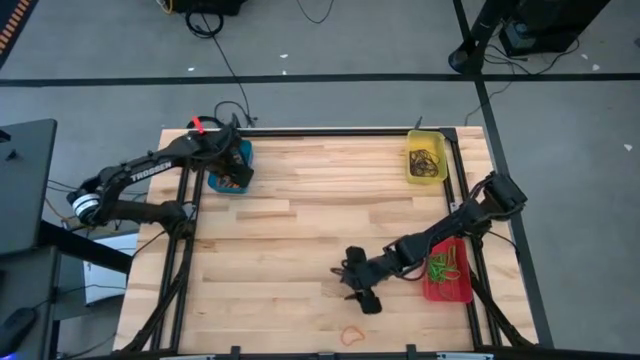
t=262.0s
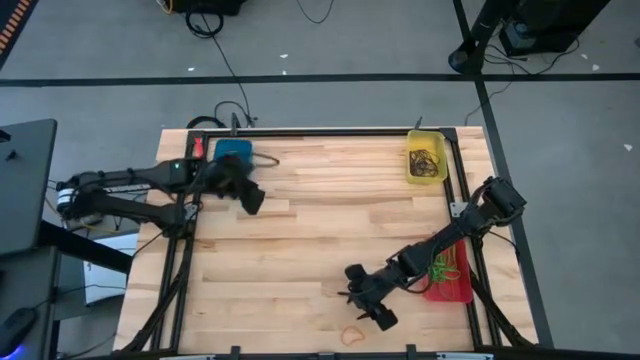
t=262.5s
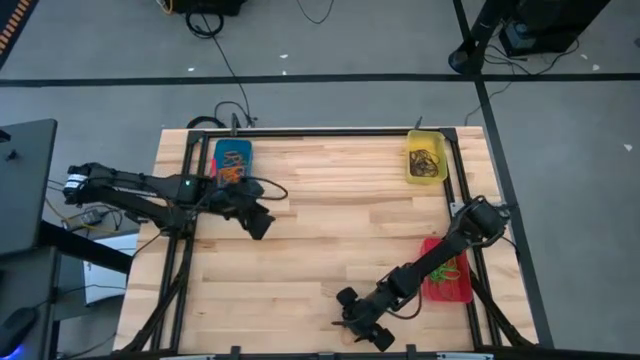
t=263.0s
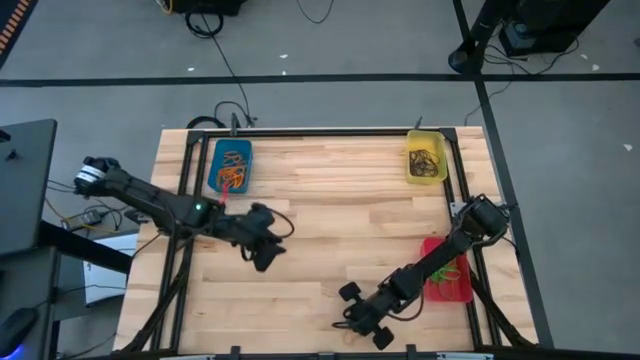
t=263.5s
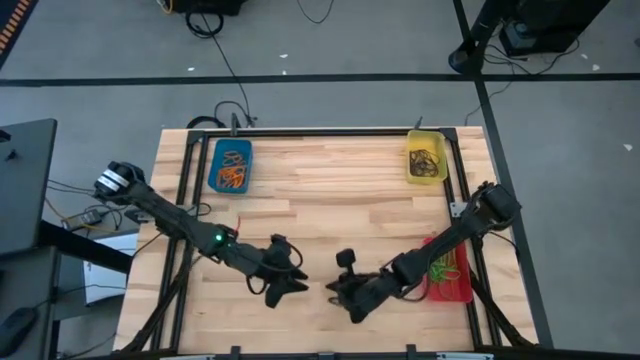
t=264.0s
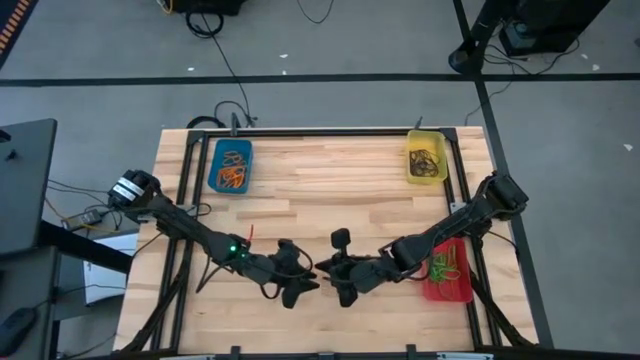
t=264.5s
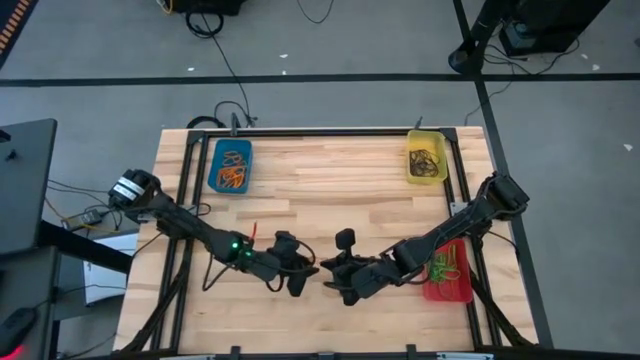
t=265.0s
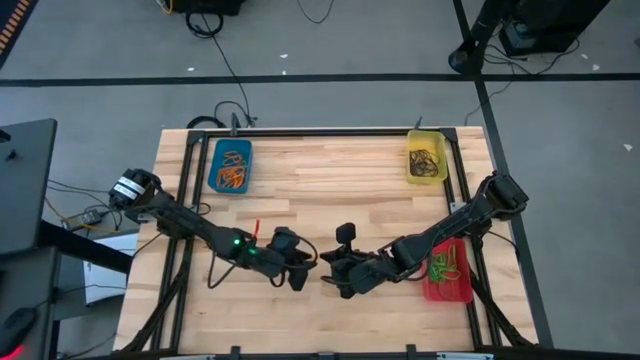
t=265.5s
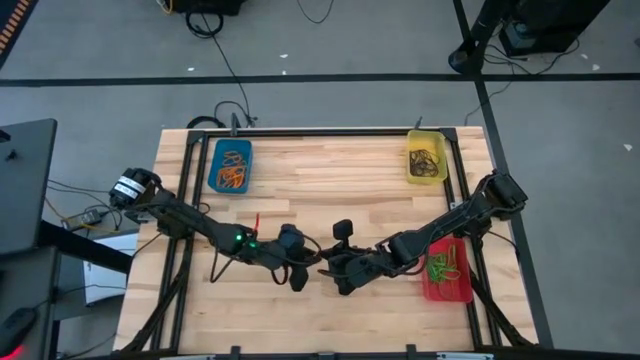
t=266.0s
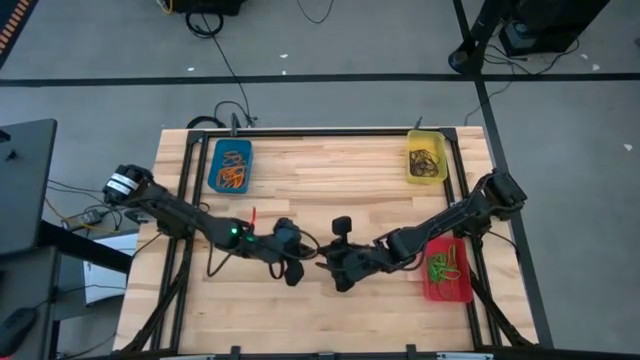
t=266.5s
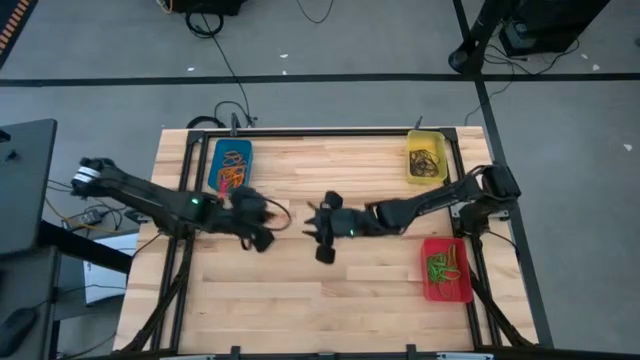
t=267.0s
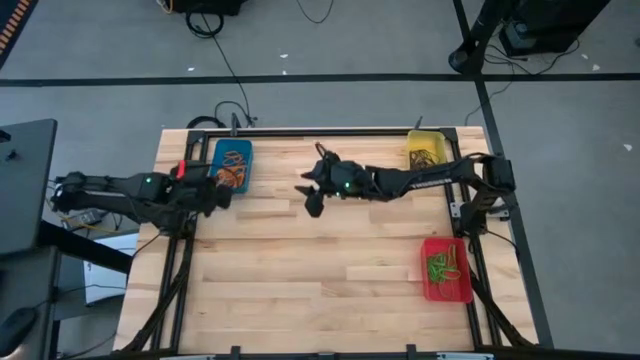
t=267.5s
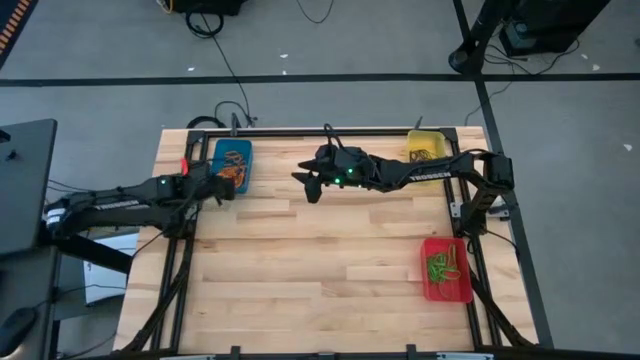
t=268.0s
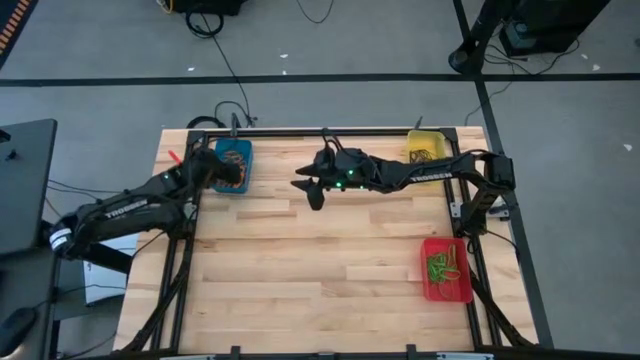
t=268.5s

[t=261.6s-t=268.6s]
Task: Sort rubber bands into baskets
Put the orange rubber band into the blue bin

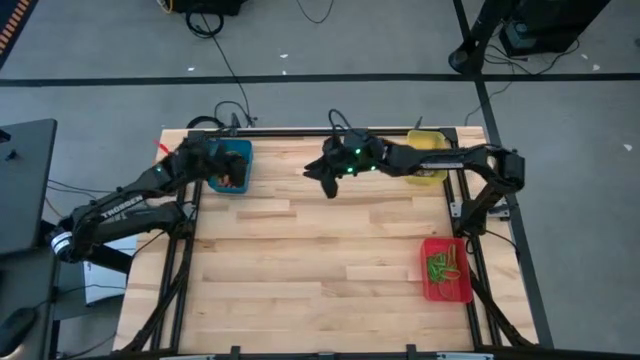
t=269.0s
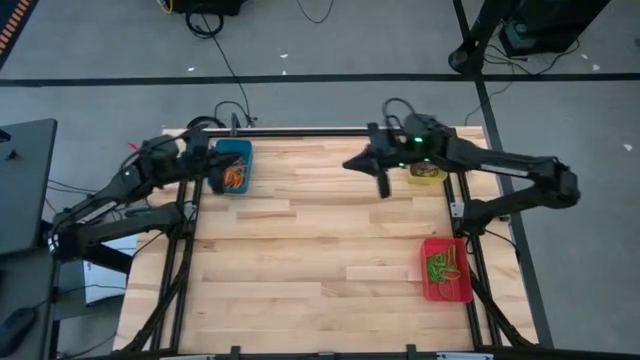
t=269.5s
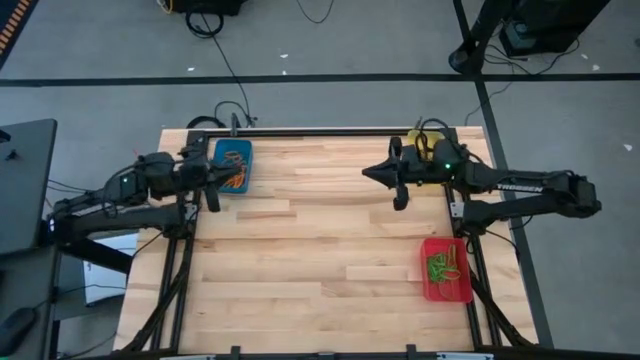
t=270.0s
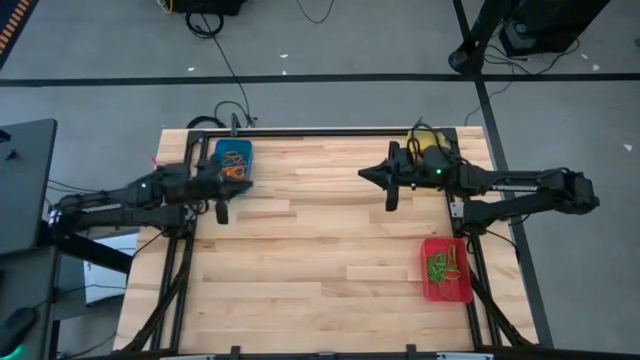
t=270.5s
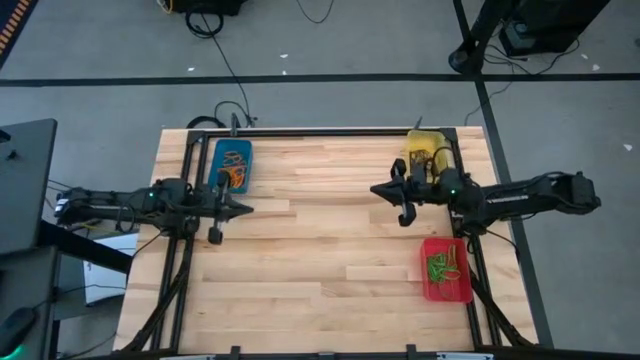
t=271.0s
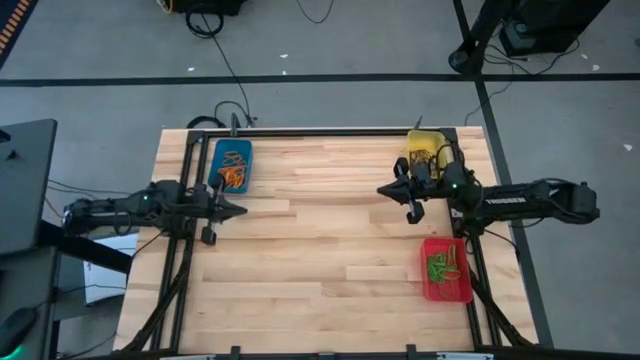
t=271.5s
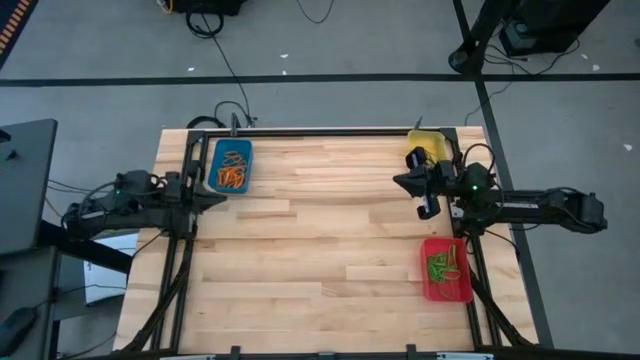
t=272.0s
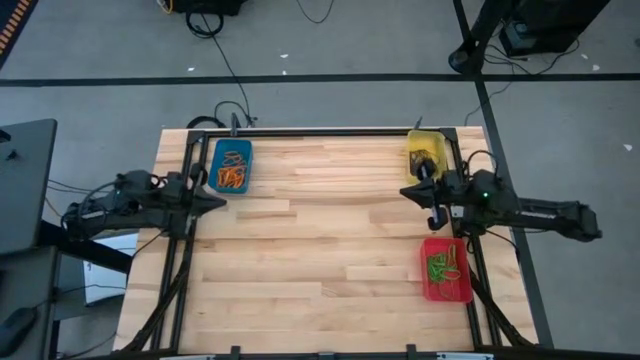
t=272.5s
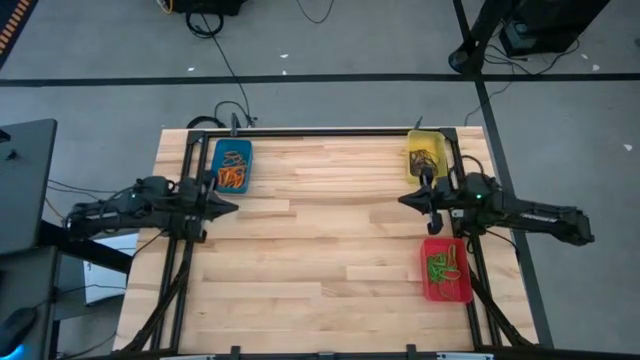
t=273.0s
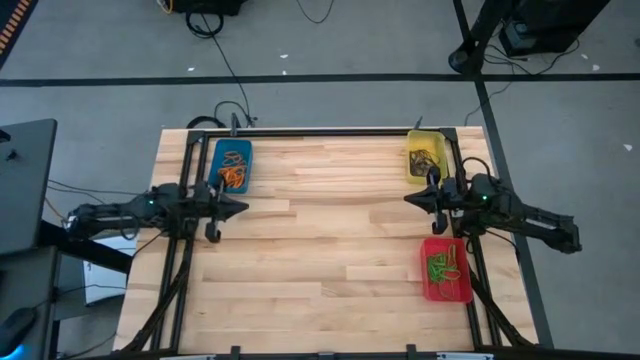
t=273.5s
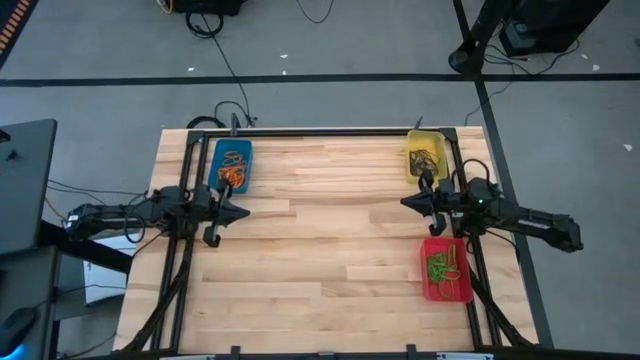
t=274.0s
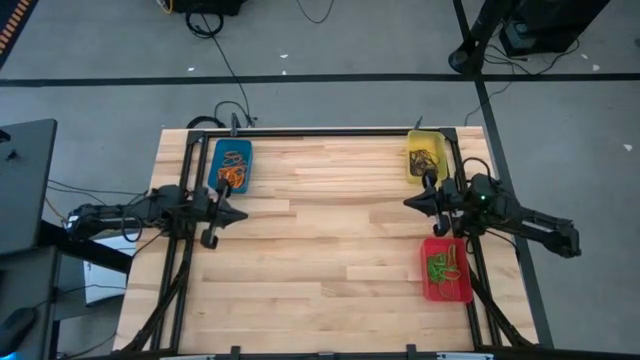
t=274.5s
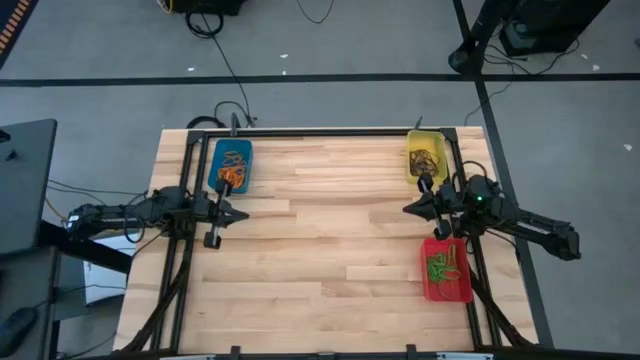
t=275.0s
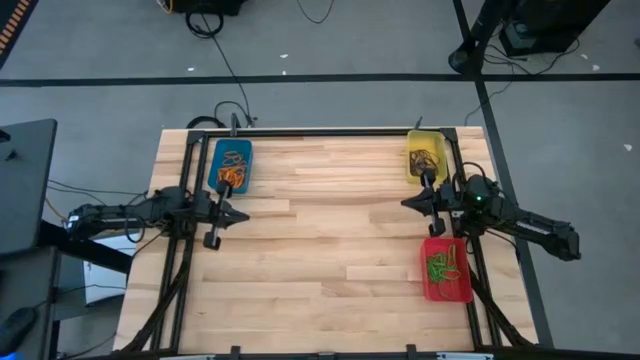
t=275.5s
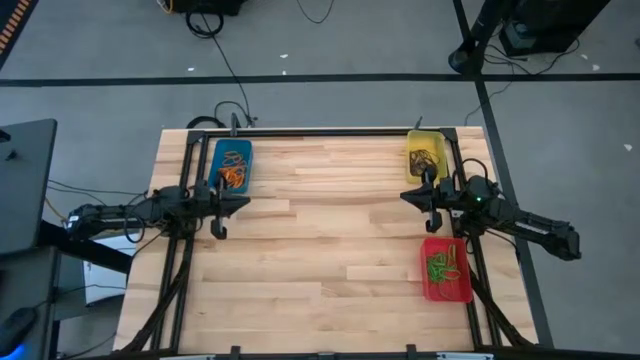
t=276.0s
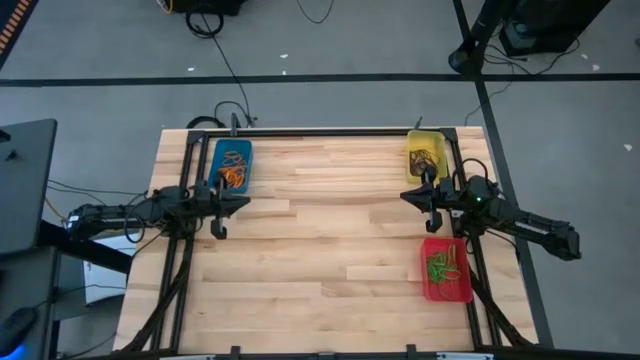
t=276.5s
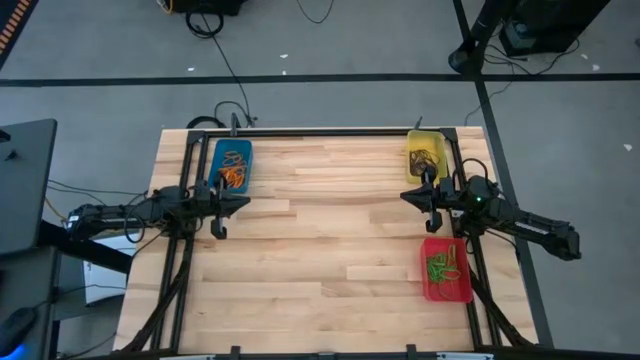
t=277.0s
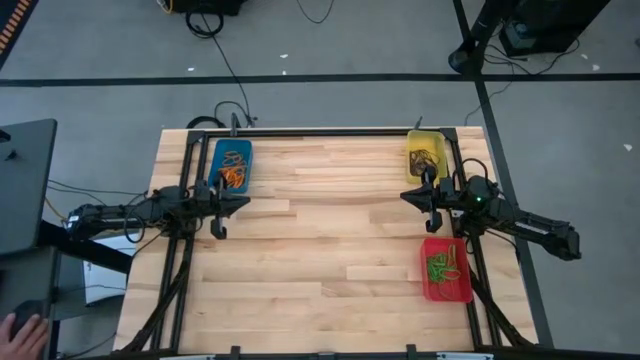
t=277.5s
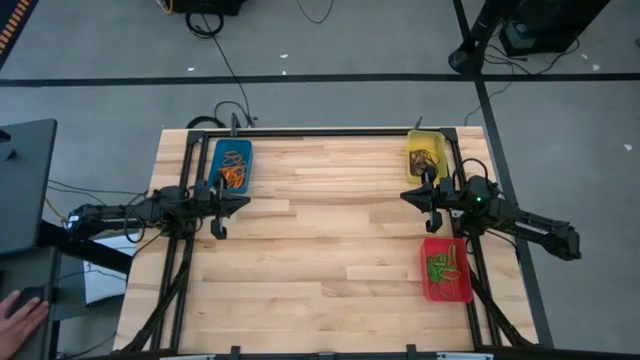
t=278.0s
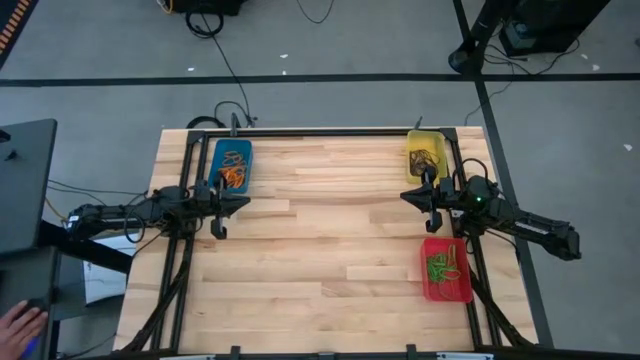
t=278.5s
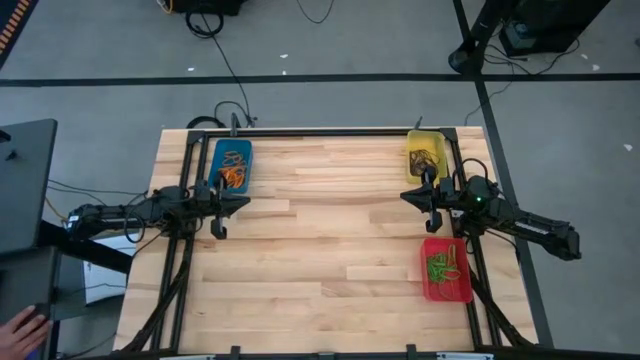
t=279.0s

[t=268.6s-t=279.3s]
Return to Home Position

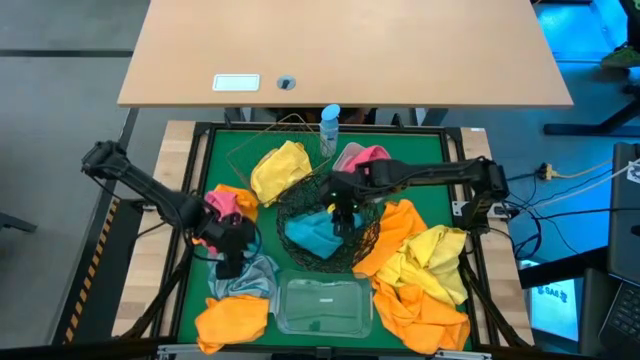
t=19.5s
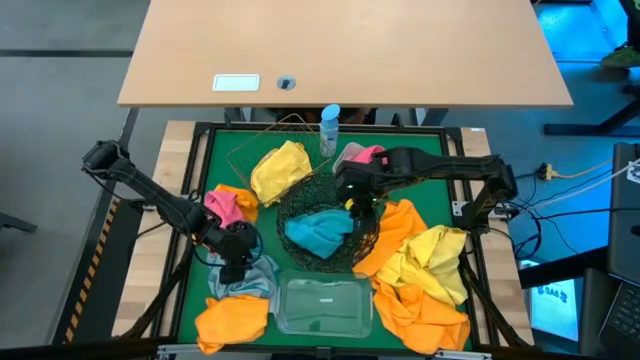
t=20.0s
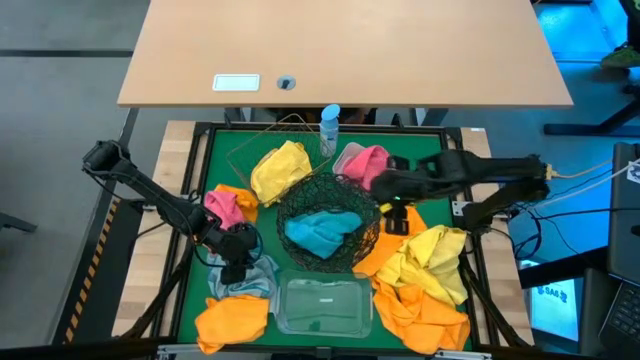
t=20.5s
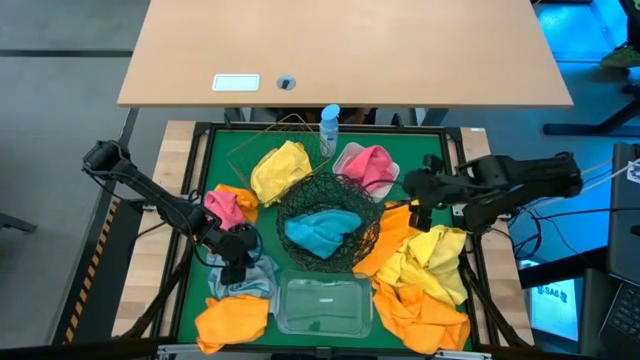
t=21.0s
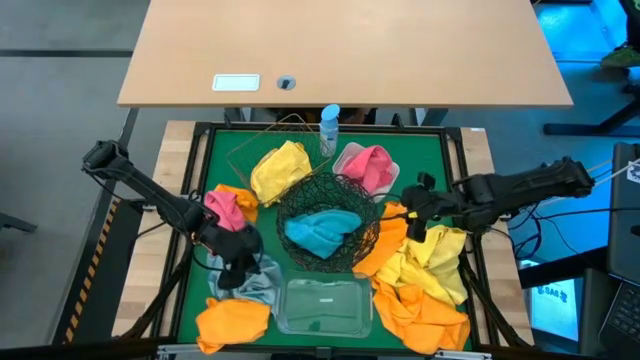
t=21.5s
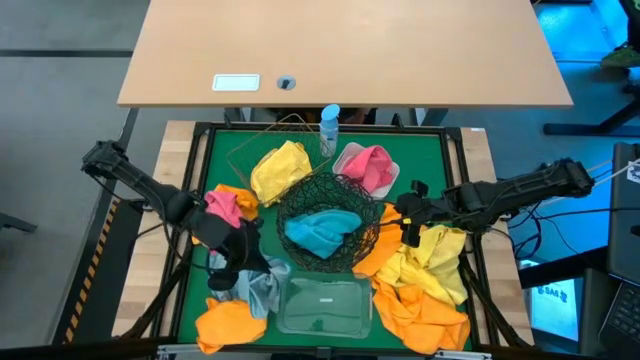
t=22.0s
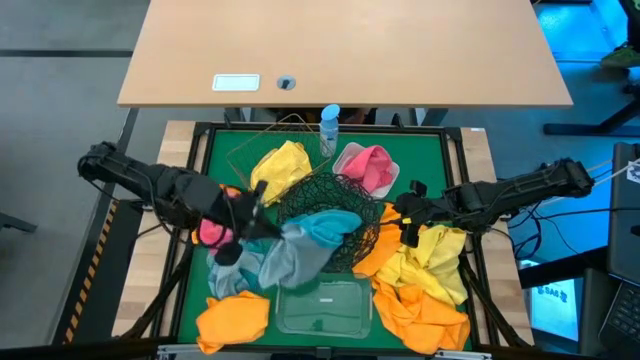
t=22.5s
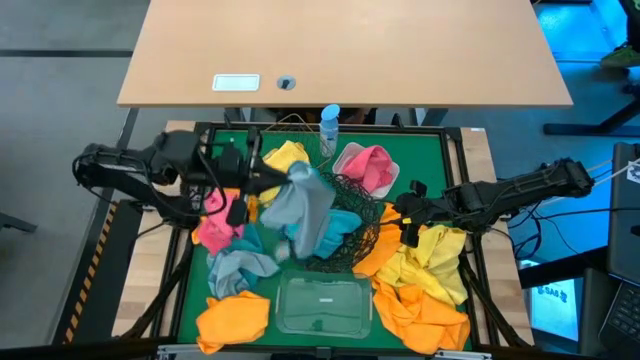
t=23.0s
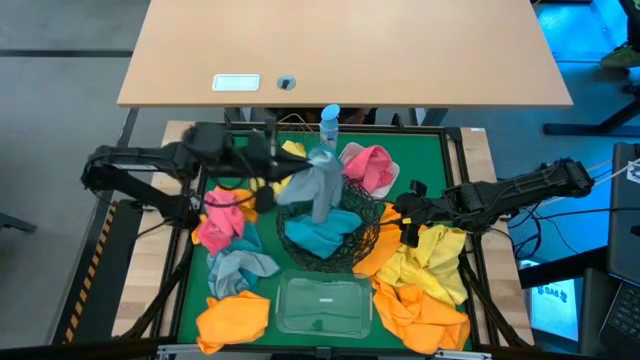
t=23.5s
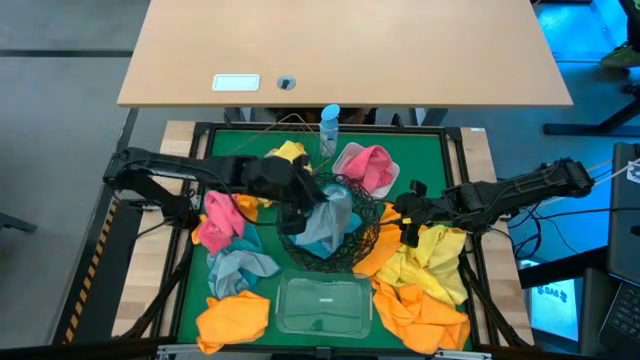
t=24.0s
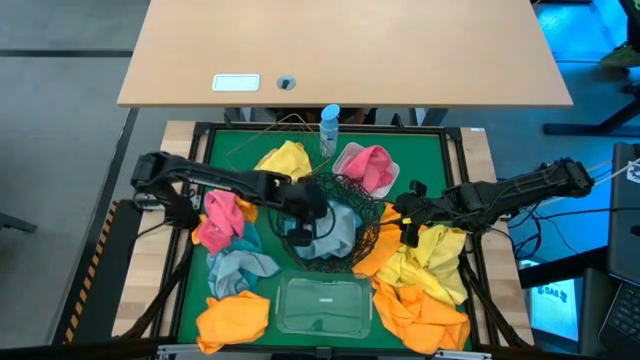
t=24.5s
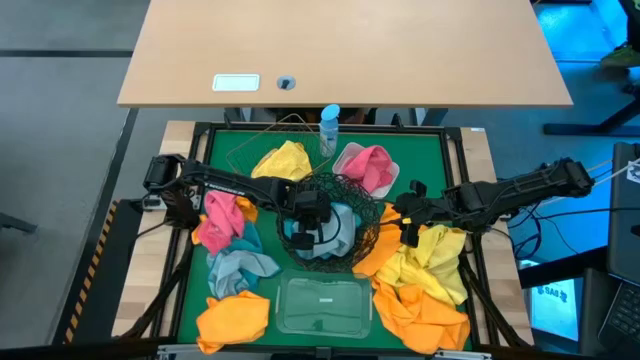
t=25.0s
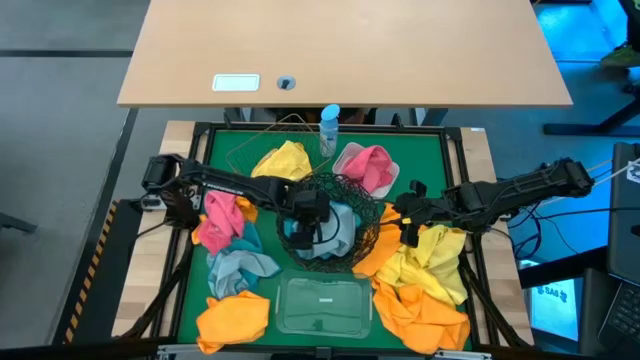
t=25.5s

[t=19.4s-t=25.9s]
Task: Sort microfiber towel by color & place in baskets
Put the blue microfiber towel into the black wire basket
